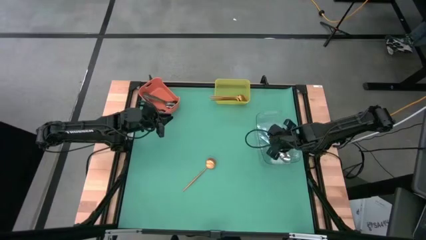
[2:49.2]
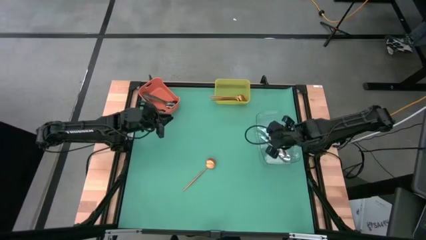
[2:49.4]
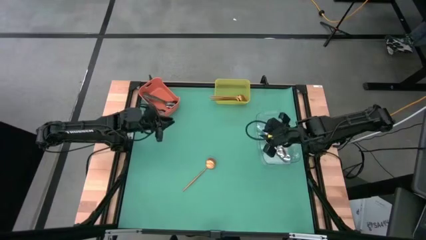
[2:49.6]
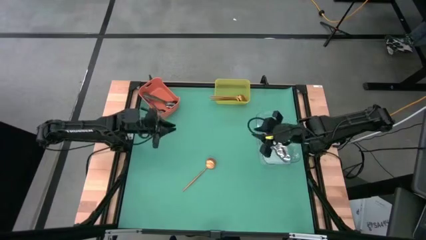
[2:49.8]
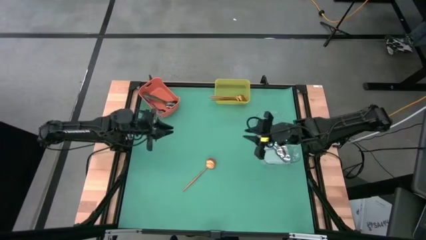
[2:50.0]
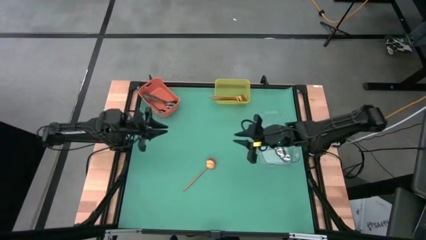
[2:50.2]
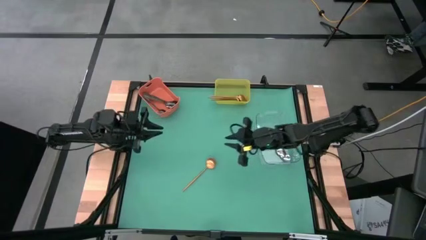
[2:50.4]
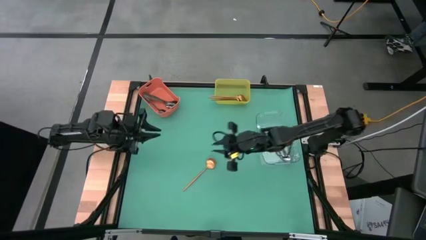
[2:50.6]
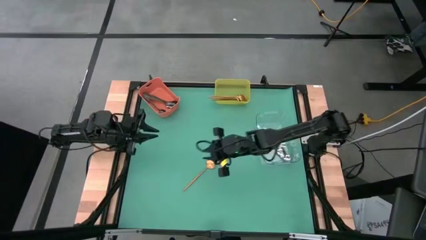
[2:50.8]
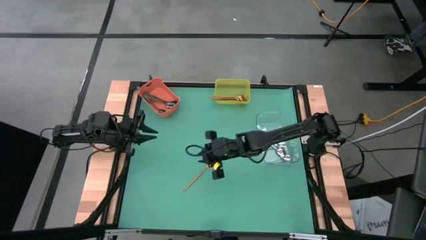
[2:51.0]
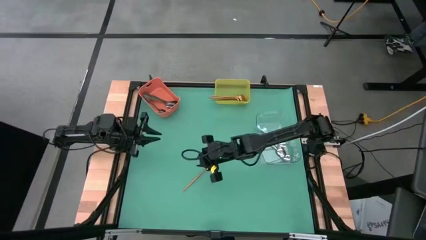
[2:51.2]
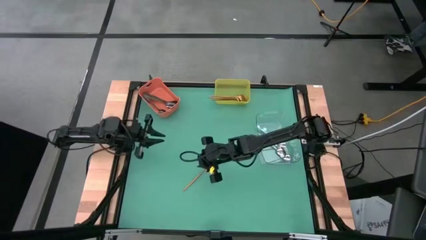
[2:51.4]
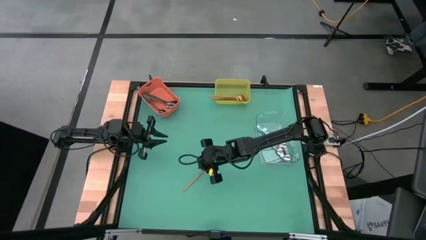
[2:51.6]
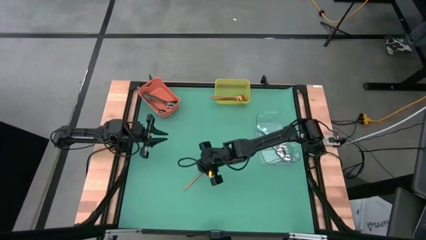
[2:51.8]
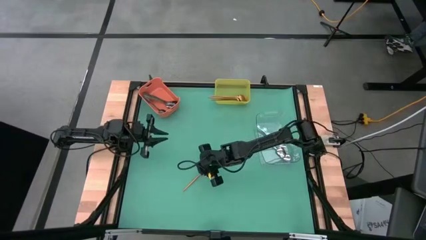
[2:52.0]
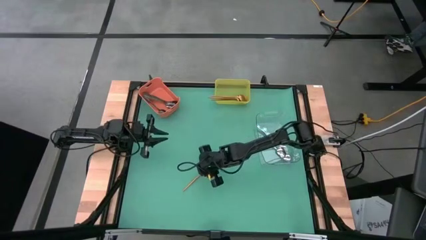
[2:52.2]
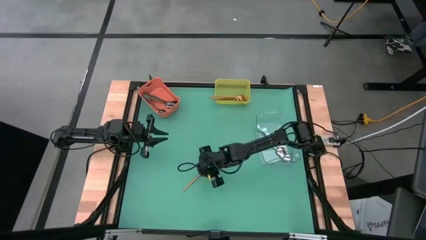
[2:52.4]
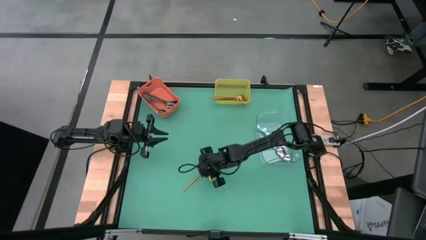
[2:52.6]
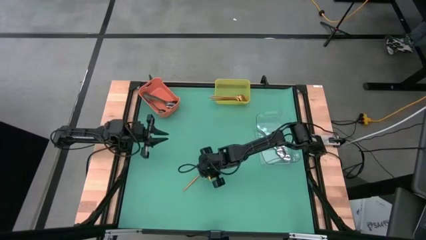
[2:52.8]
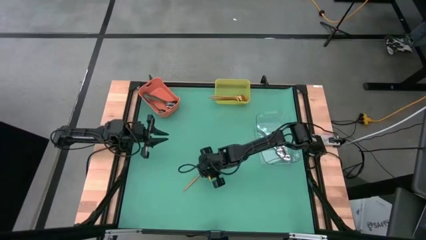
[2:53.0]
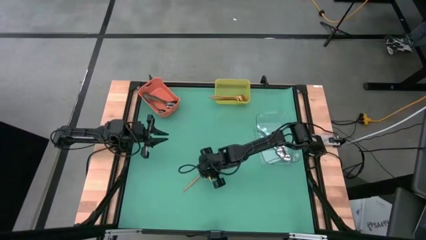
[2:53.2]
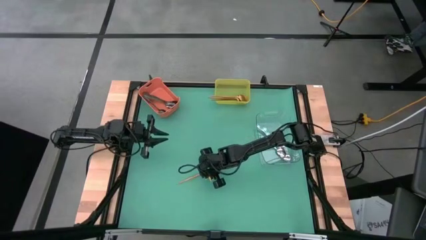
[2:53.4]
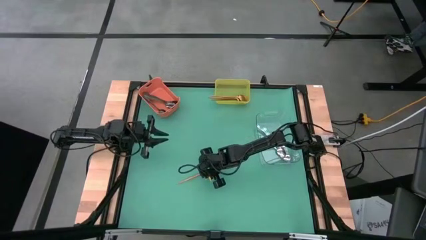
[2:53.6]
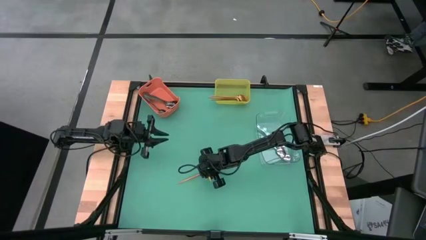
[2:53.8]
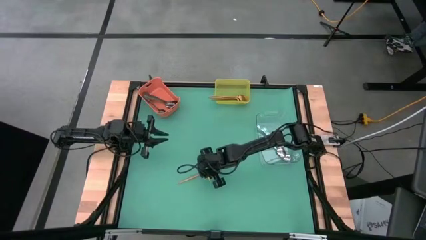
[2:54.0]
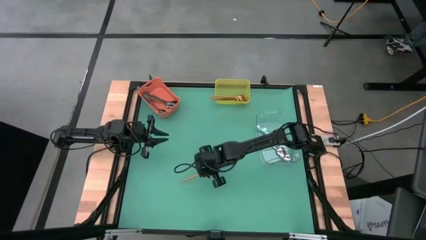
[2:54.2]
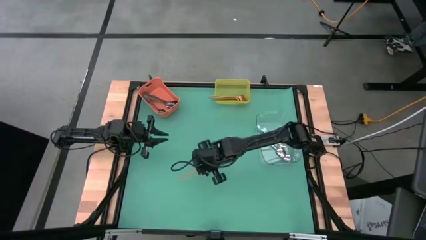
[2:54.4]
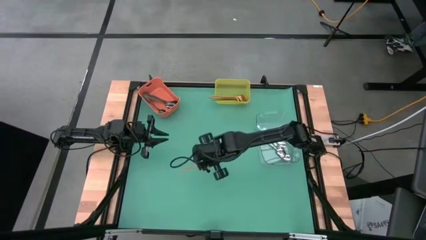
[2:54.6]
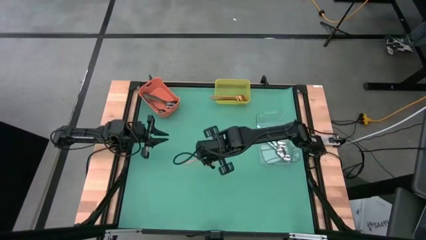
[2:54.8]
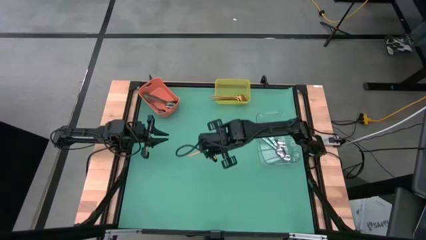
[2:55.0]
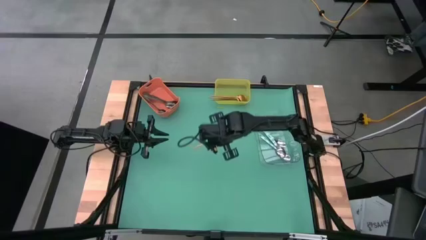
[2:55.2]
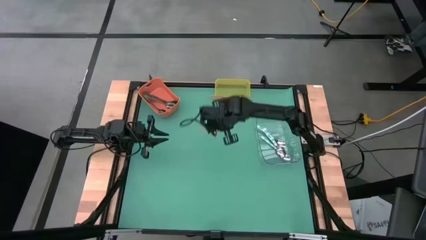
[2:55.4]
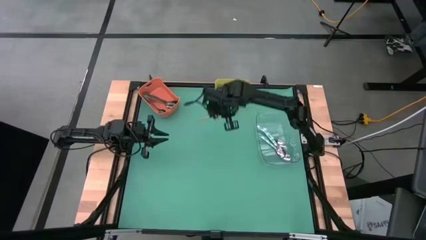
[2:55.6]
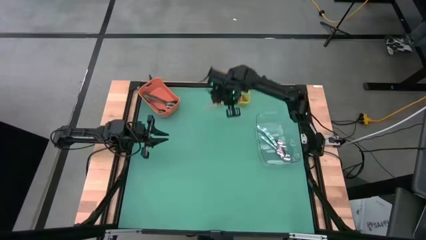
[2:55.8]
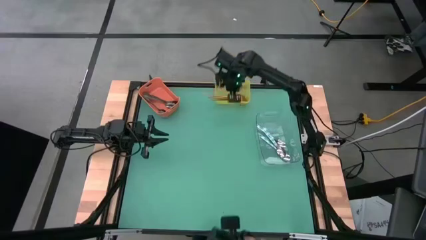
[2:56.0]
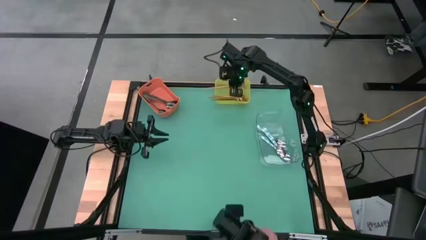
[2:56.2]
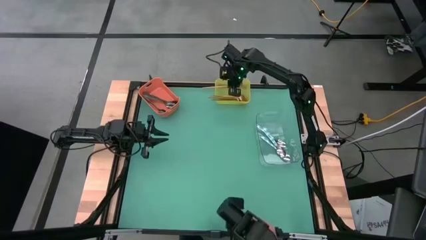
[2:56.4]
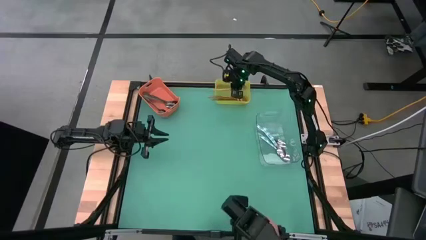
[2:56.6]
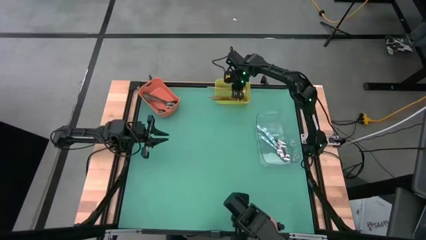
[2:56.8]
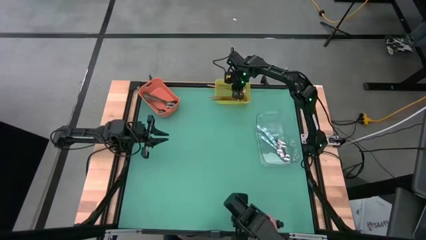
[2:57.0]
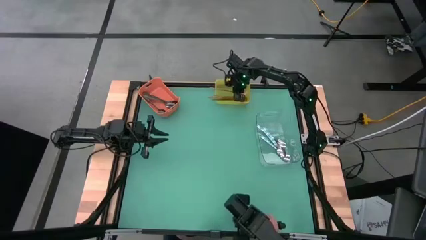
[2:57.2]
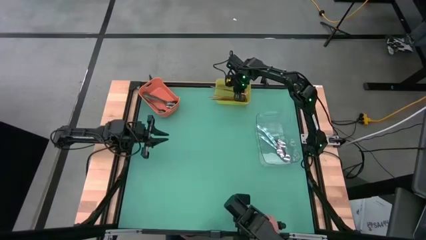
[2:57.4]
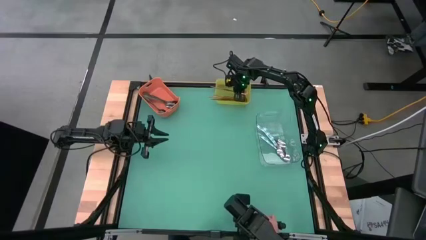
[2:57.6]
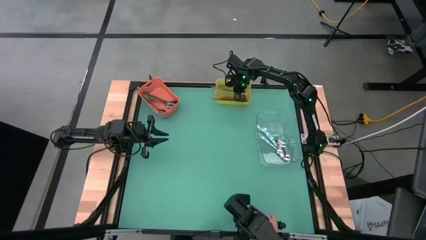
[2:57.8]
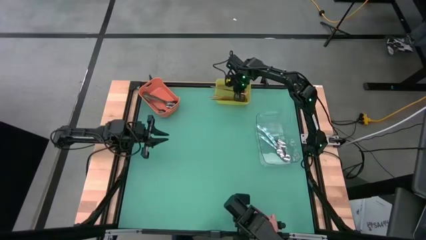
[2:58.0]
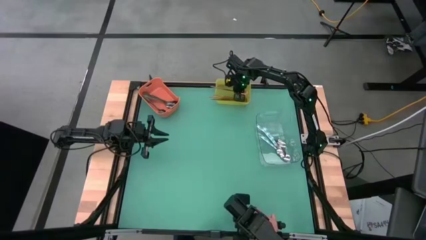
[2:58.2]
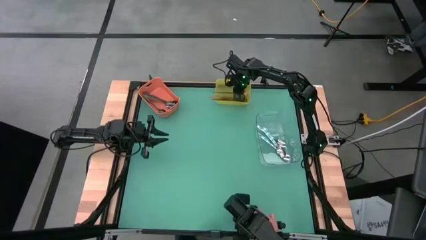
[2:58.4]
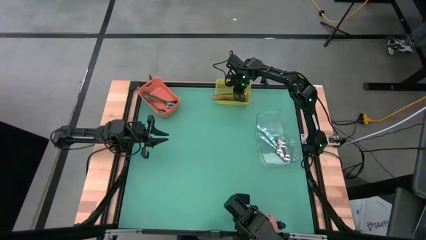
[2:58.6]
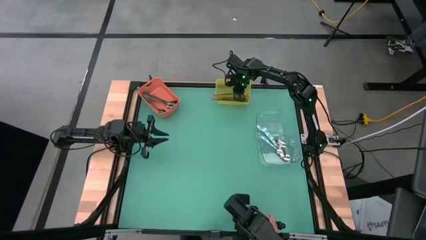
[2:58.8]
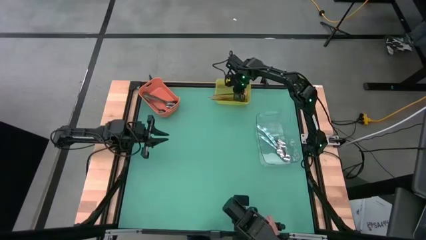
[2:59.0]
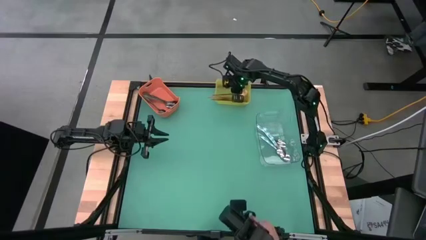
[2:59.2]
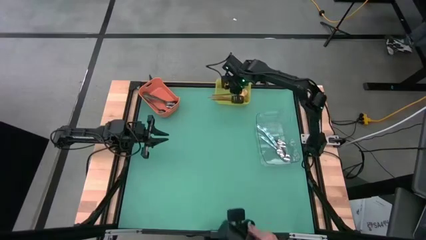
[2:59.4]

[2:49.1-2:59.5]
Task: Sort silverware by color (type)
Put the gold spoon into the yellow bin

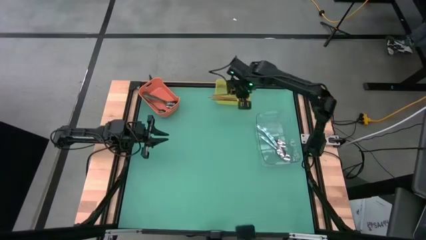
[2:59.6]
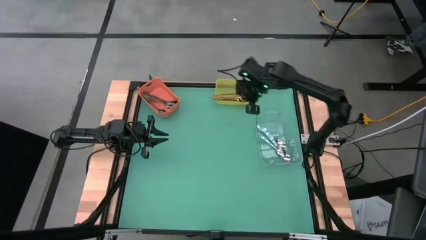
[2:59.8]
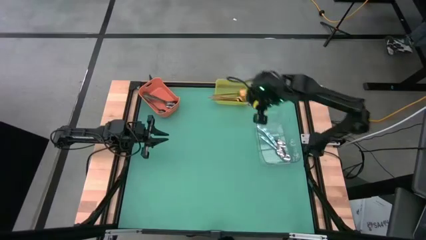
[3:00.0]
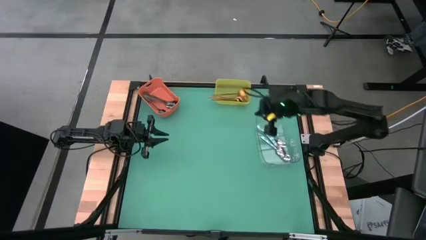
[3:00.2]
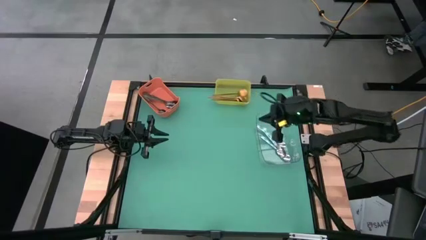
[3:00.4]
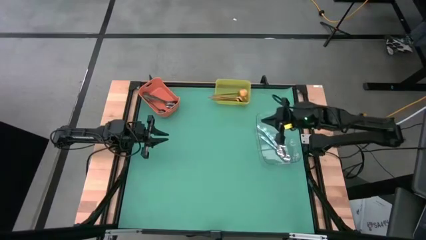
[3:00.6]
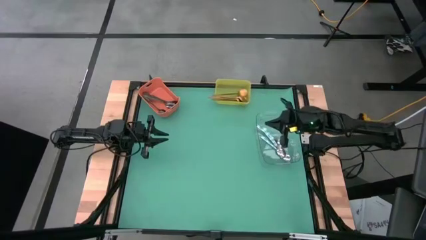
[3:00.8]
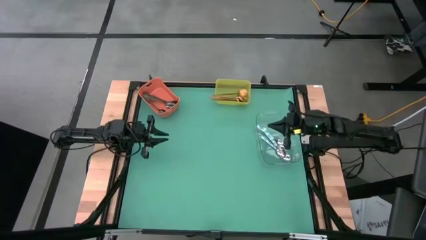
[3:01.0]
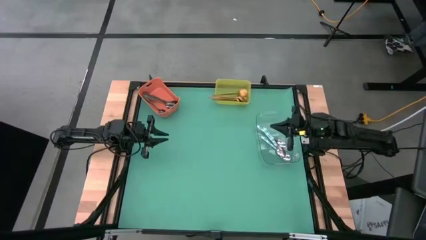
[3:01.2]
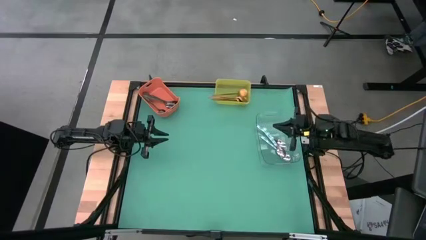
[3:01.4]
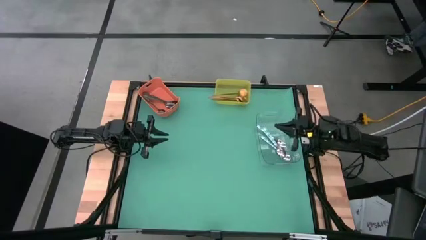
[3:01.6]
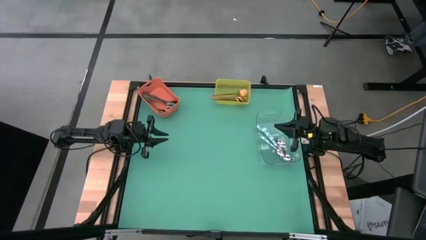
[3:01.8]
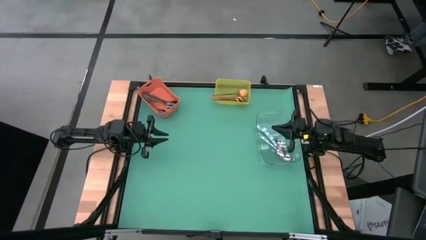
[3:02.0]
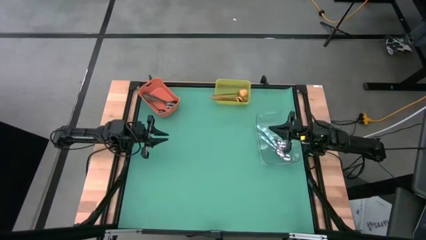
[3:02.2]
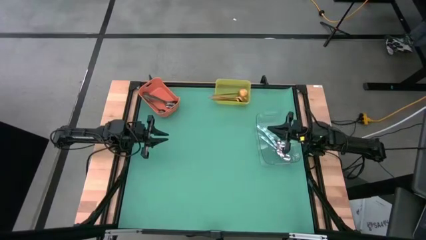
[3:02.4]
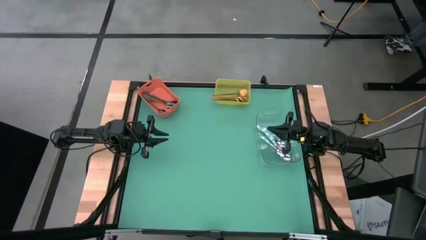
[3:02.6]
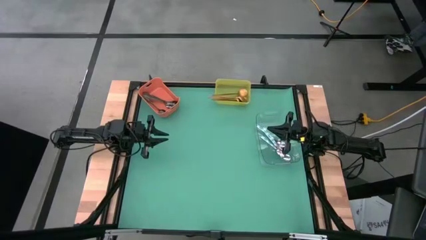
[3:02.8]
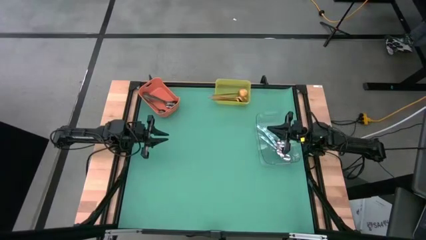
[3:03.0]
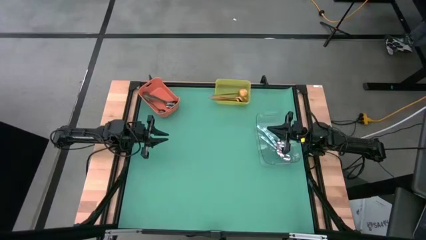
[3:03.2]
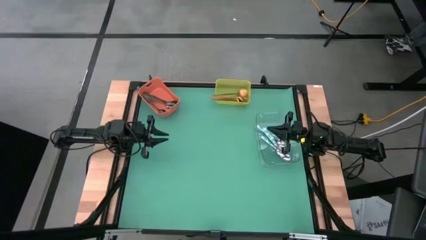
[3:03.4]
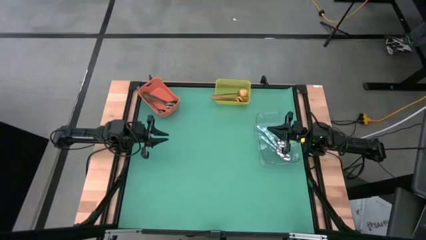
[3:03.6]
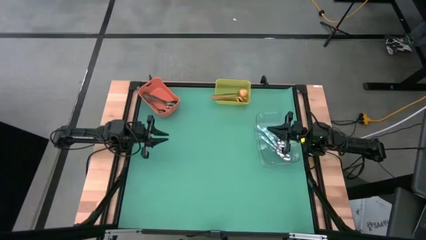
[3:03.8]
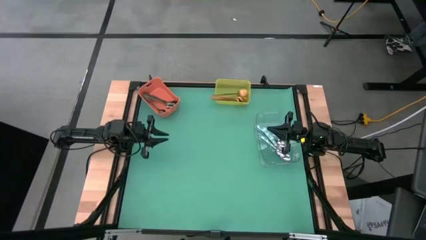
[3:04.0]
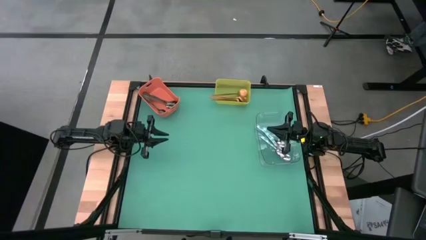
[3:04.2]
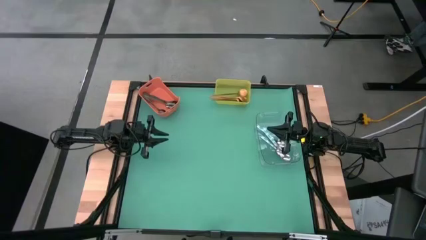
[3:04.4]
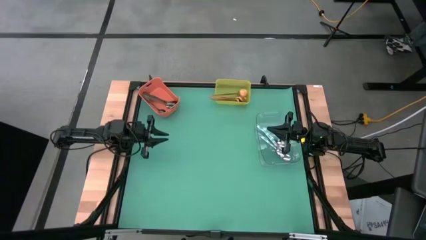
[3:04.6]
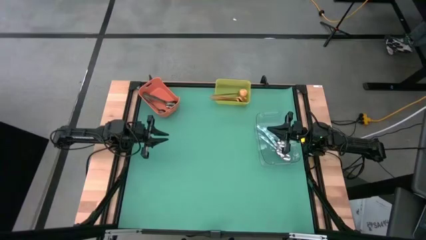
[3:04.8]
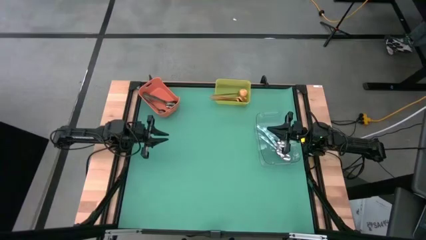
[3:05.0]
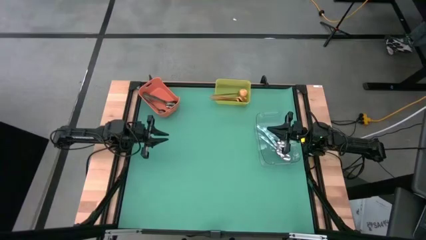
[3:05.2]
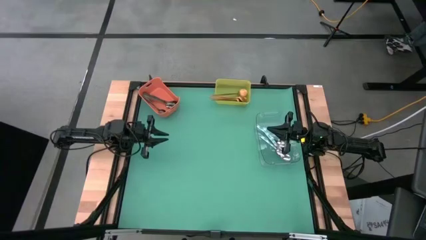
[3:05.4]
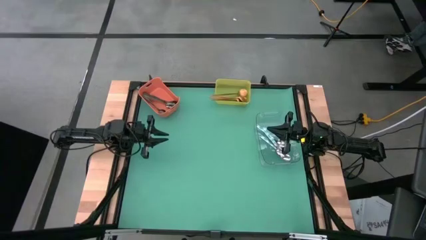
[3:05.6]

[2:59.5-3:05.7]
Return to Home Position
